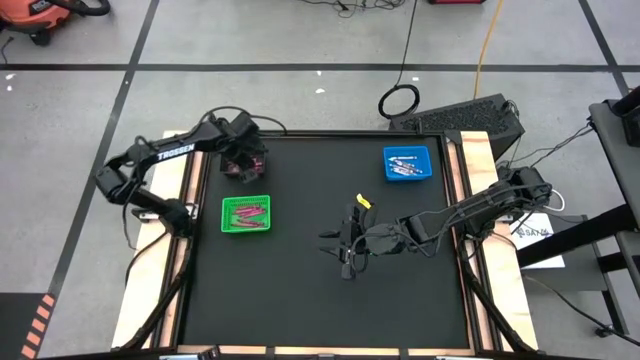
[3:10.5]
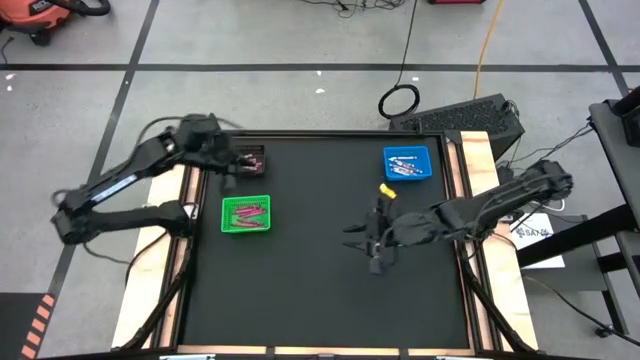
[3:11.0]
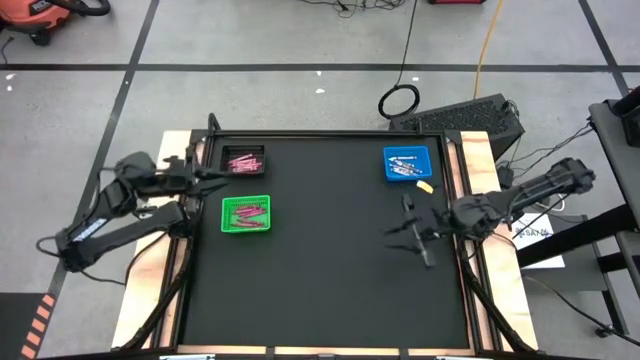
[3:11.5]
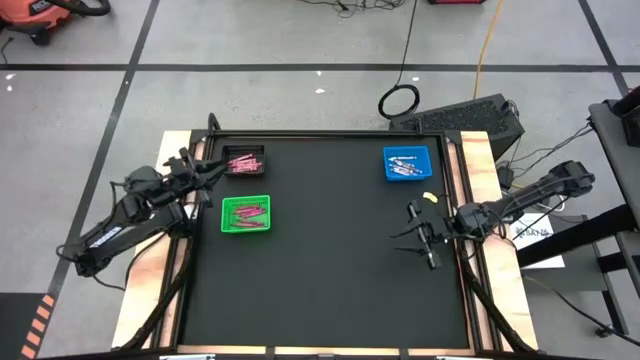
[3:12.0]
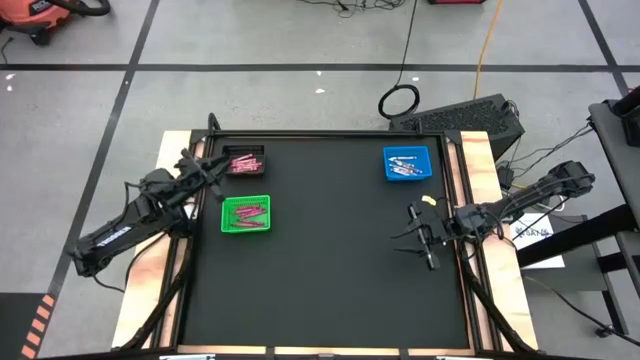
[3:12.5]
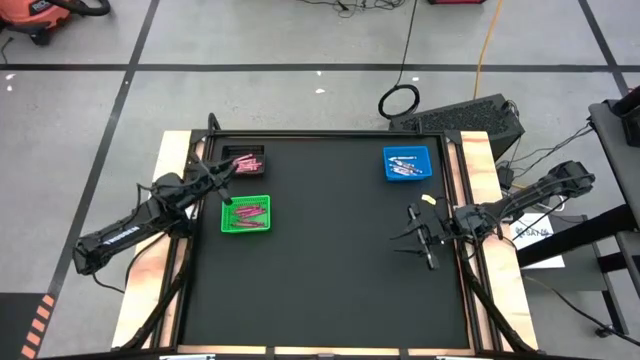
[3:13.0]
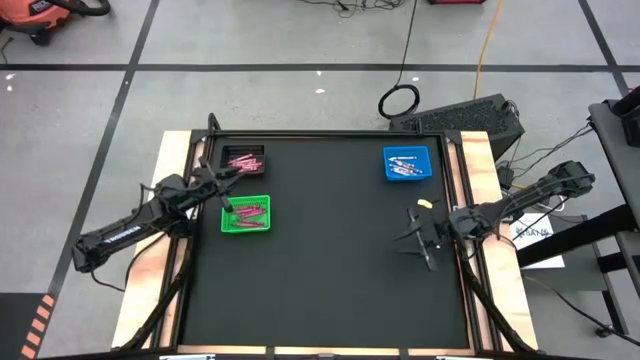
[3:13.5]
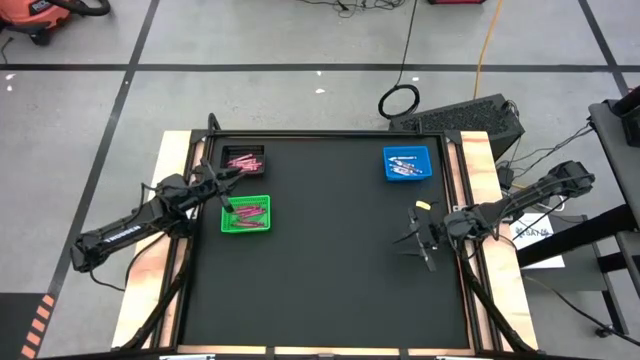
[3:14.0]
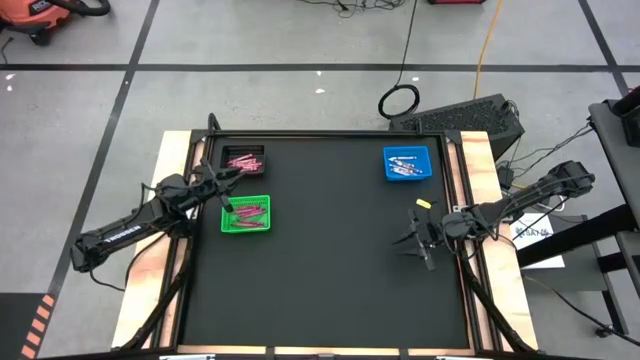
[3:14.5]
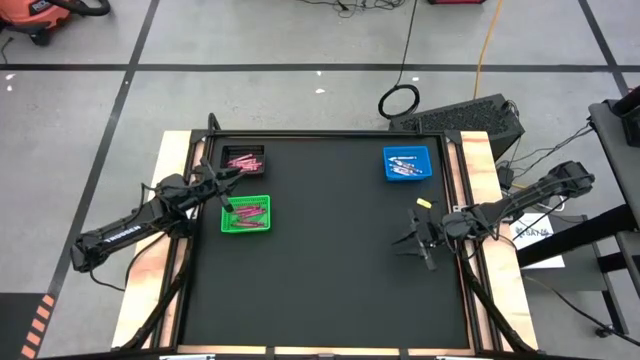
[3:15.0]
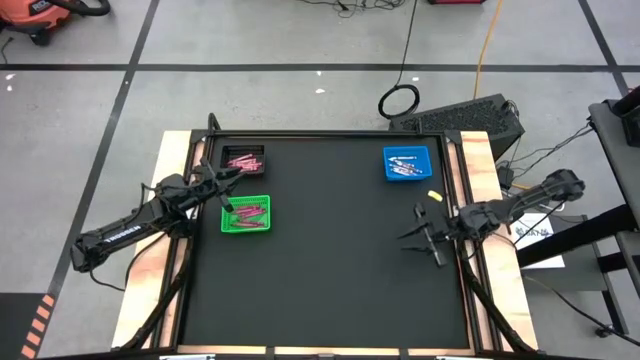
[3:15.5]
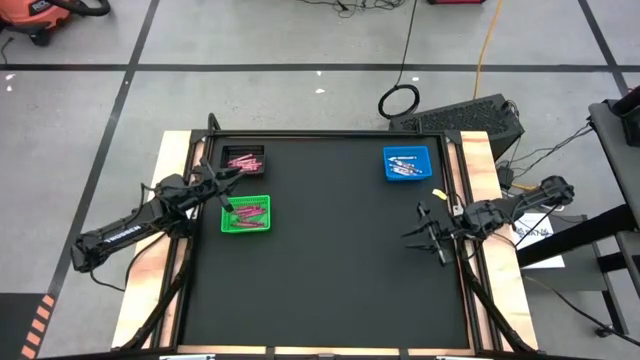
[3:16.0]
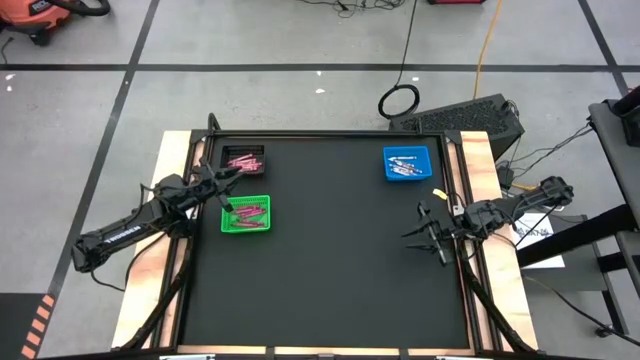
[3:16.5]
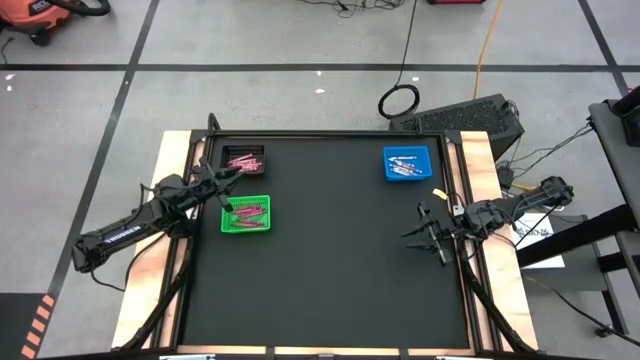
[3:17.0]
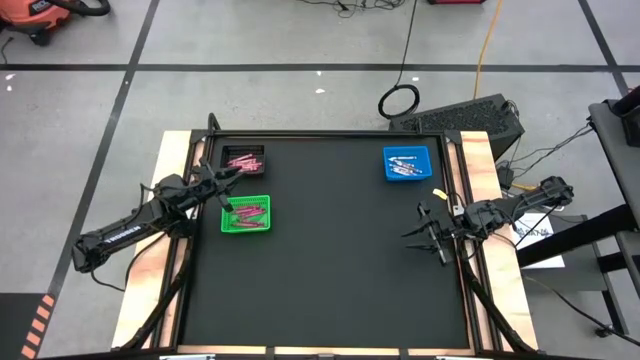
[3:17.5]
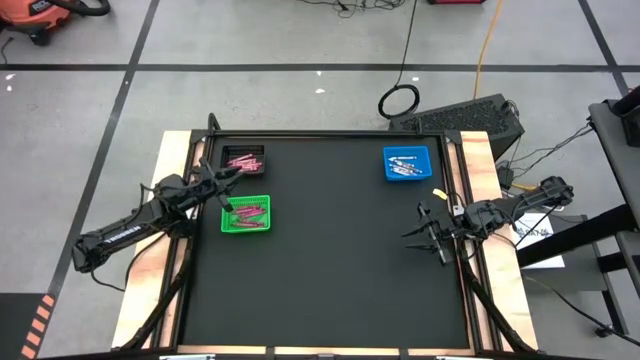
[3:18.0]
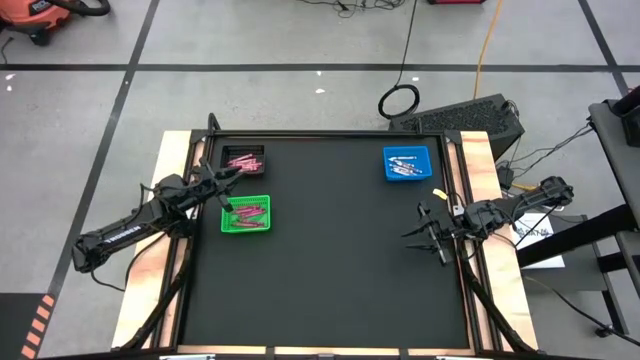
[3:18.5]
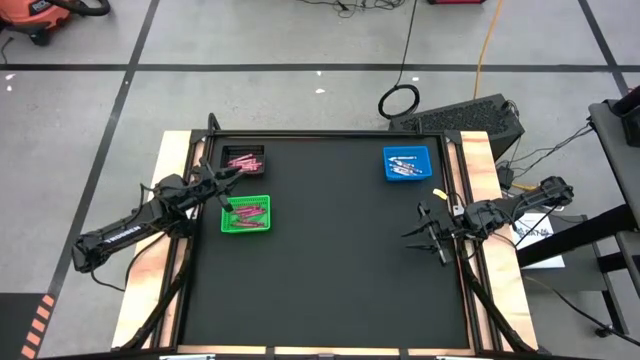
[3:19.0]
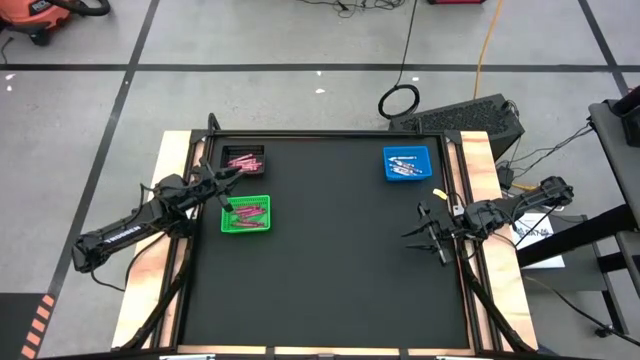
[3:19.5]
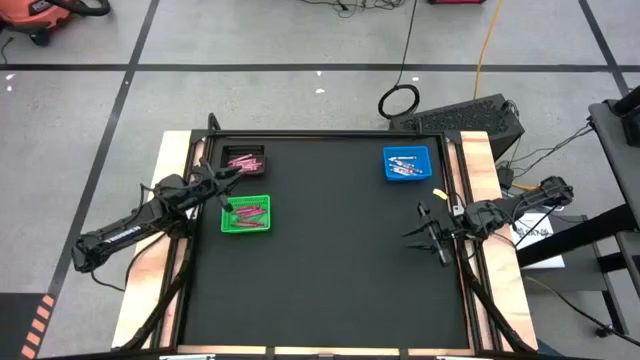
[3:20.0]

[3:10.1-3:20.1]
Task: Sort crayons
Return to Home Position

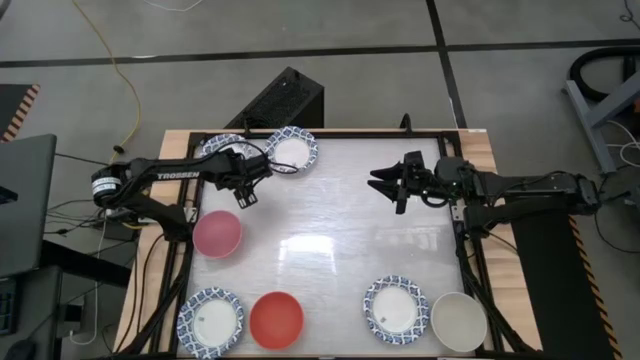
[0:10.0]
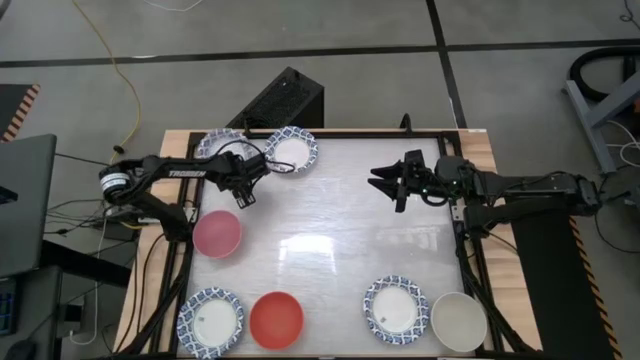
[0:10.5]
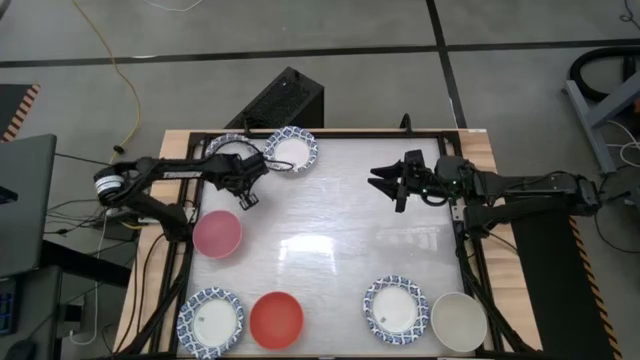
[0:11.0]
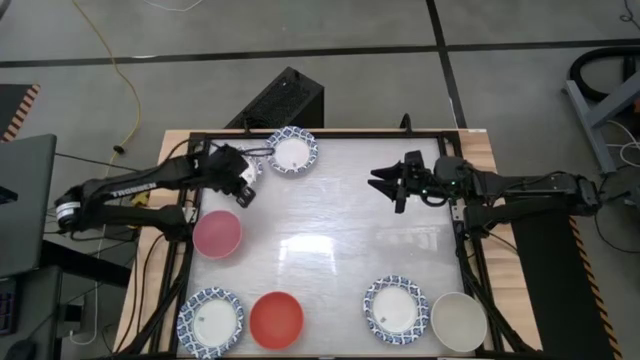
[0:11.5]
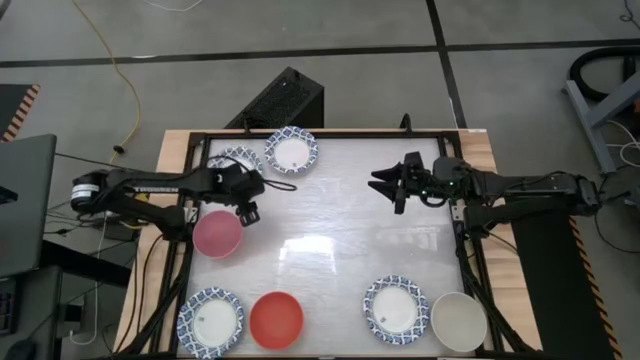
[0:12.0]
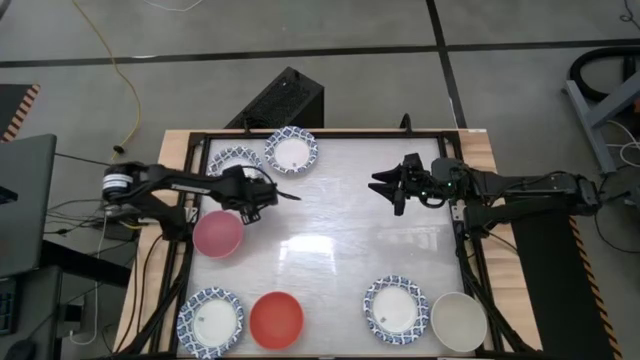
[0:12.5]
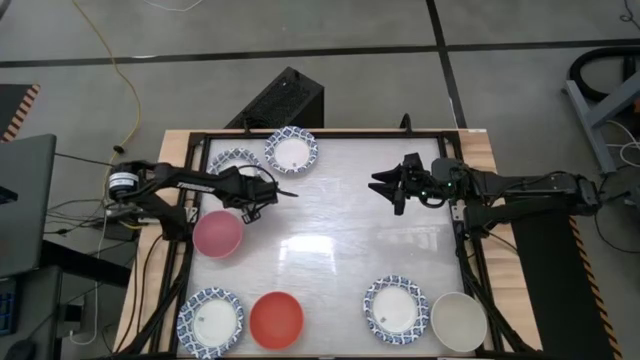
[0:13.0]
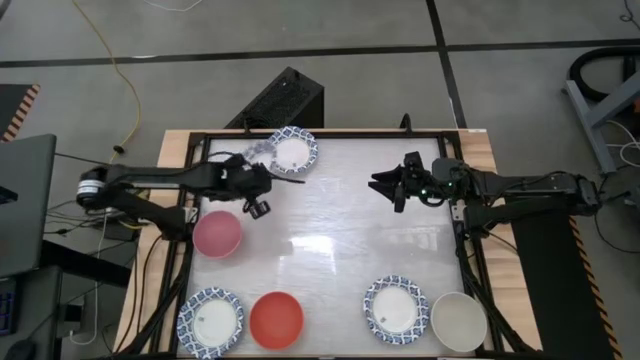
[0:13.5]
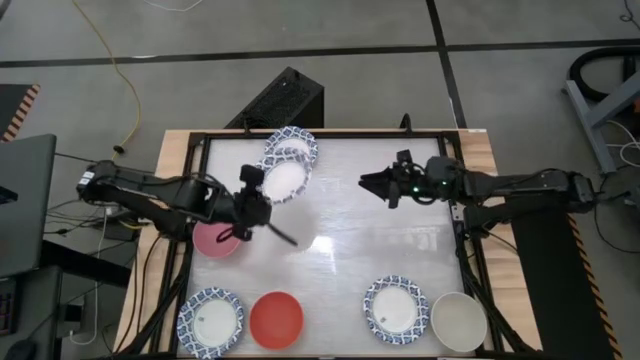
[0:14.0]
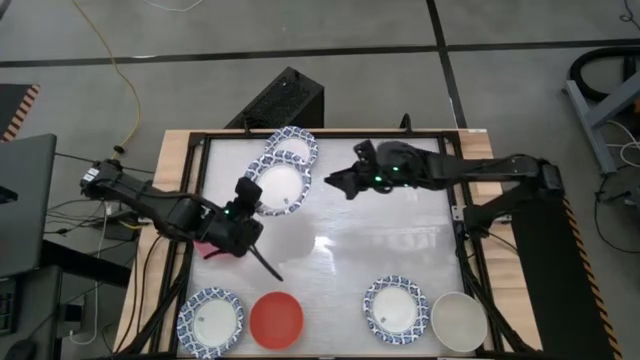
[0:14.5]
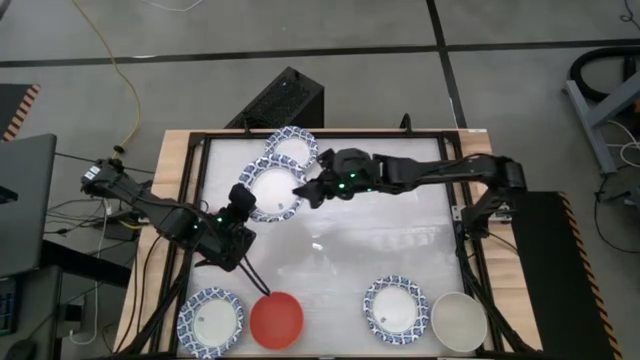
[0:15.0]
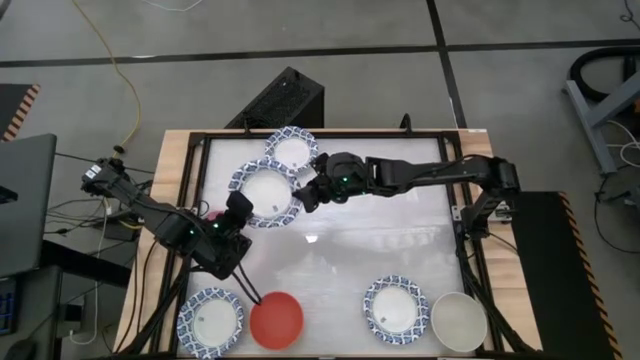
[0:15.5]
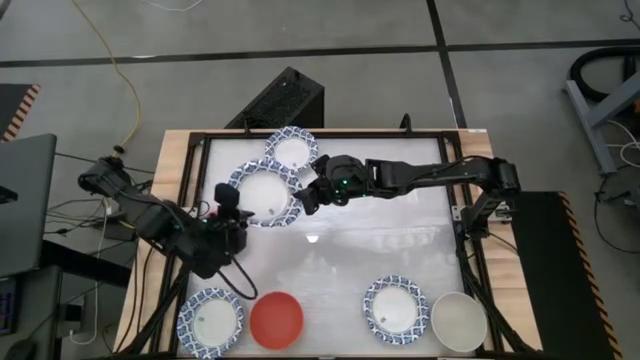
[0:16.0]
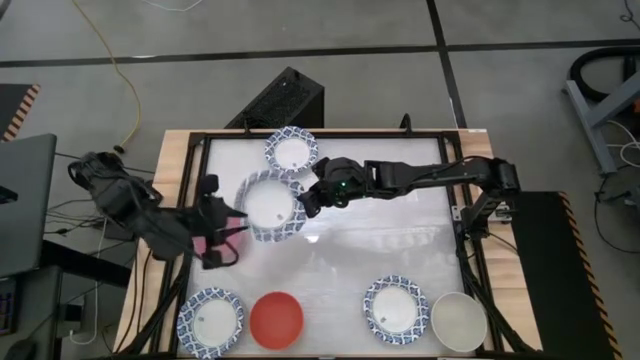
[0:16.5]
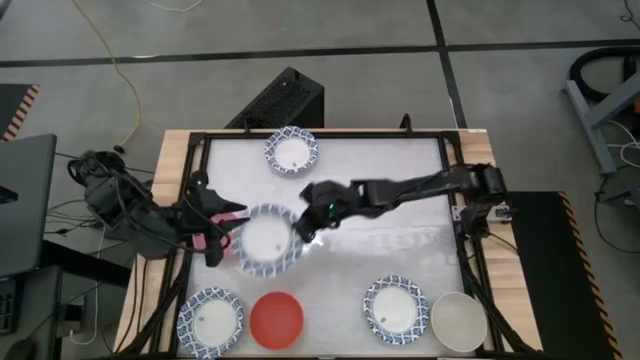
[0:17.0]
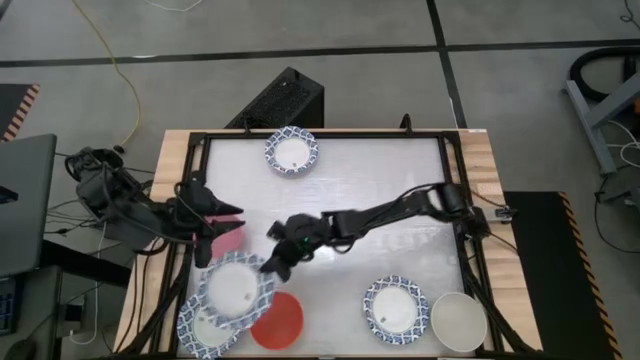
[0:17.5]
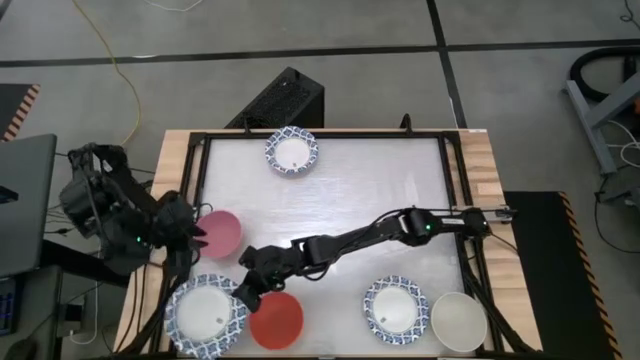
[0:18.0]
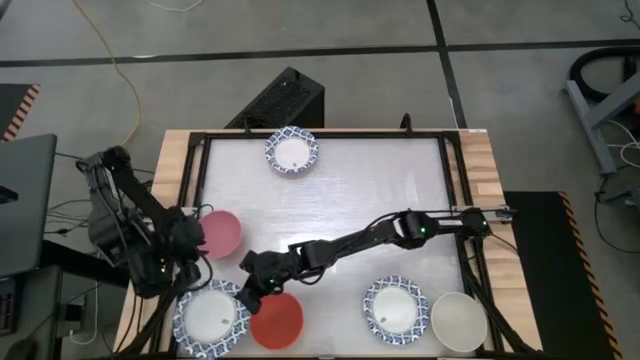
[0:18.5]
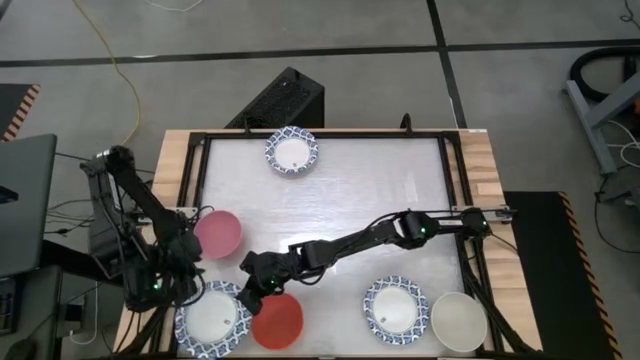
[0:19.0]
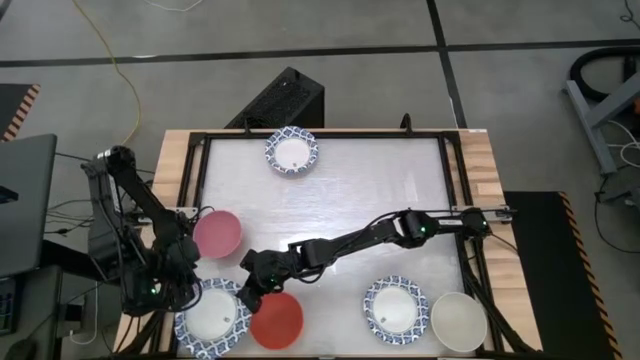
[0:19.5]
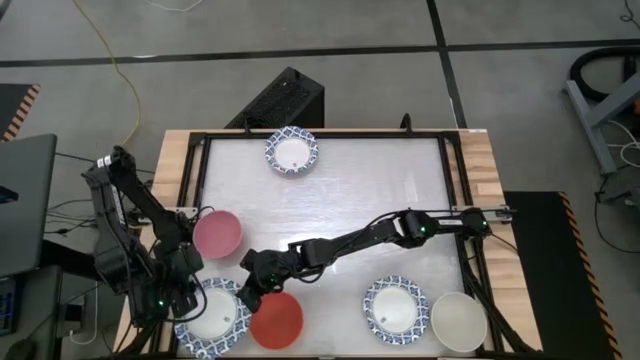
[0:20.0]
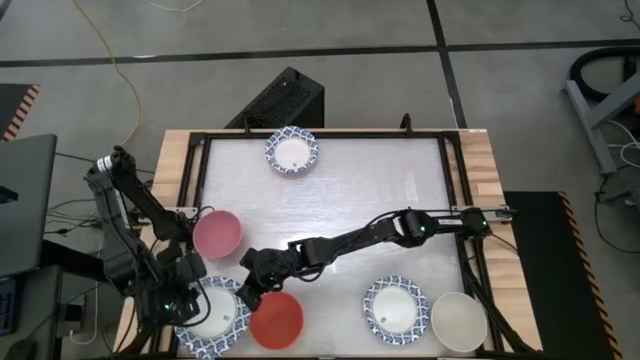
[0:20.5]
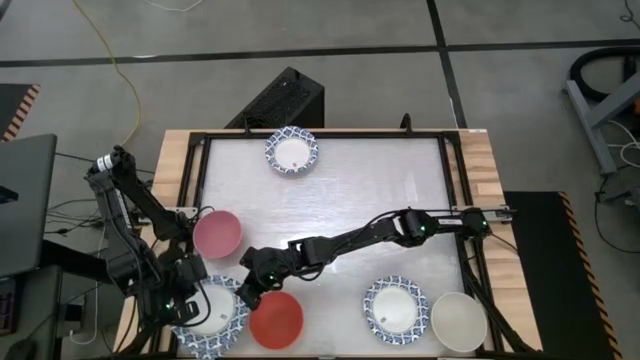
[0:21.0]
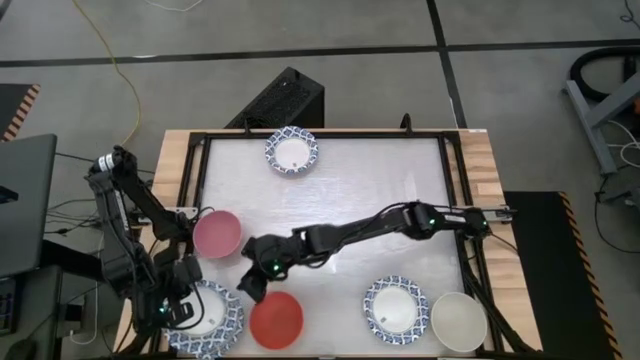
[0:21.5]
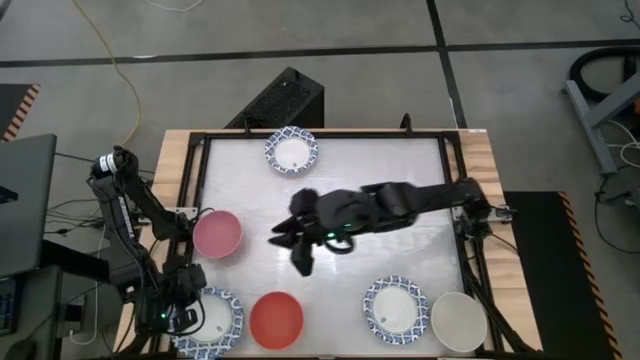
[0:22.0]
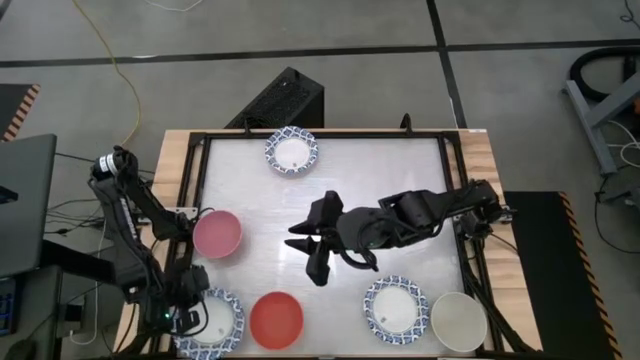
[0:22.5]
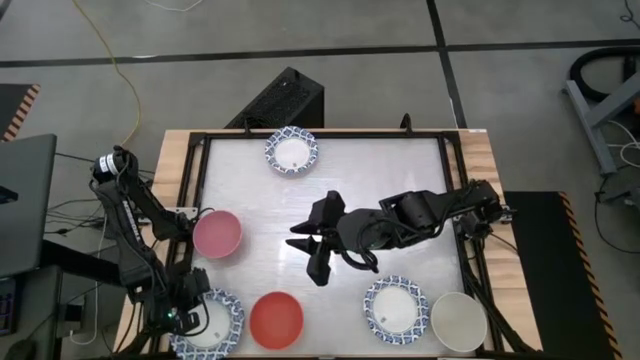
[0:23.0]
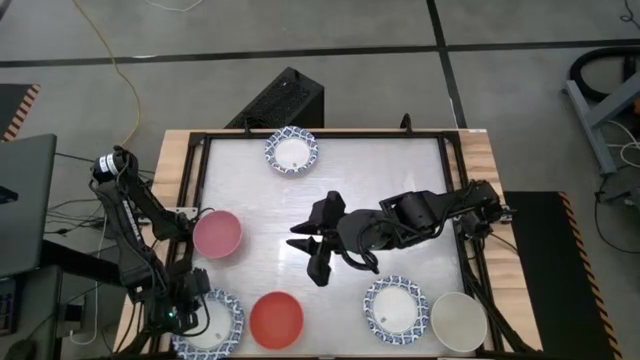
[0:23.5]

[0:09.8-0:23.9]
Task: Nest bowls inside each other by size order
Stack the white bowl onto the other white bowl
